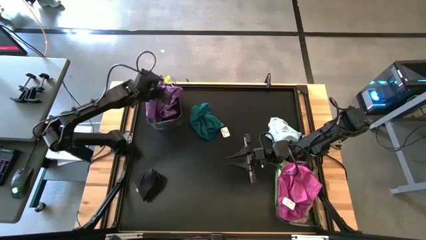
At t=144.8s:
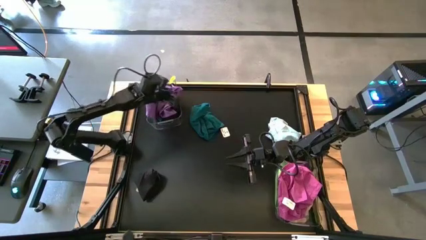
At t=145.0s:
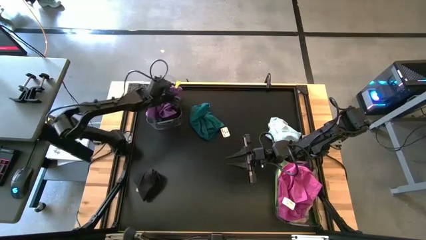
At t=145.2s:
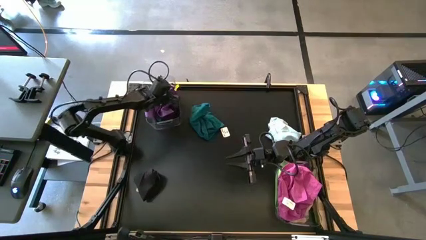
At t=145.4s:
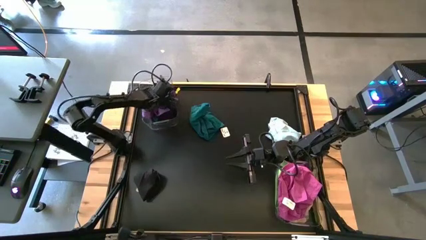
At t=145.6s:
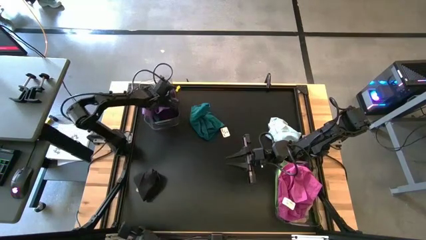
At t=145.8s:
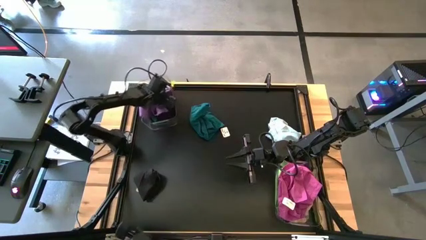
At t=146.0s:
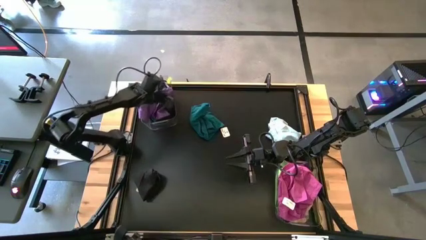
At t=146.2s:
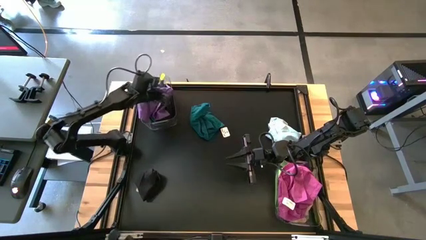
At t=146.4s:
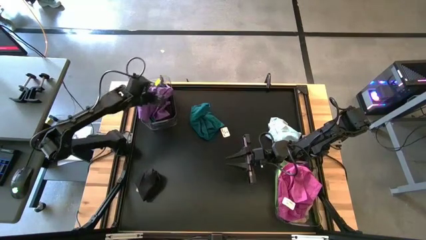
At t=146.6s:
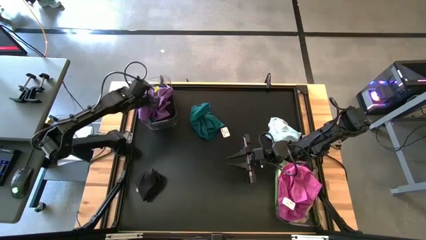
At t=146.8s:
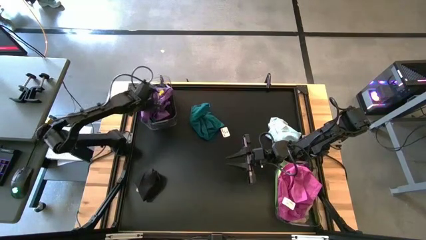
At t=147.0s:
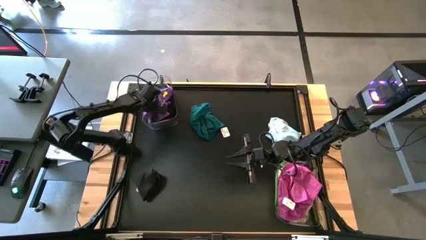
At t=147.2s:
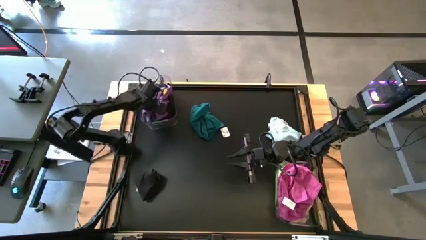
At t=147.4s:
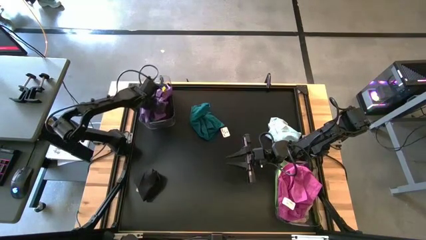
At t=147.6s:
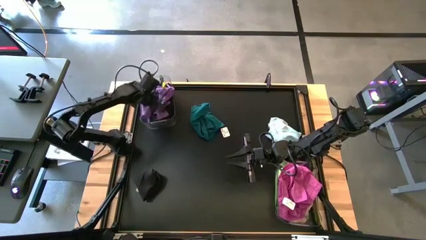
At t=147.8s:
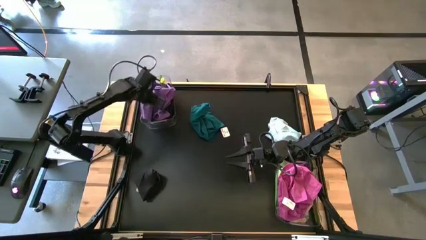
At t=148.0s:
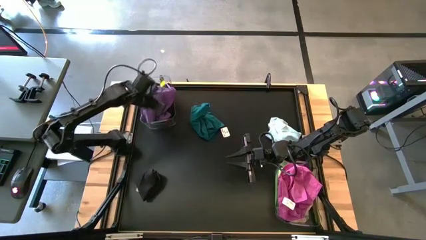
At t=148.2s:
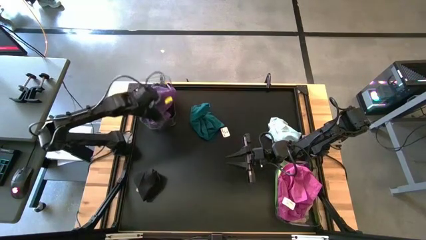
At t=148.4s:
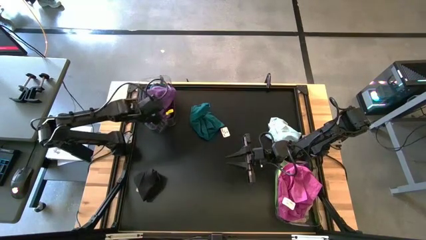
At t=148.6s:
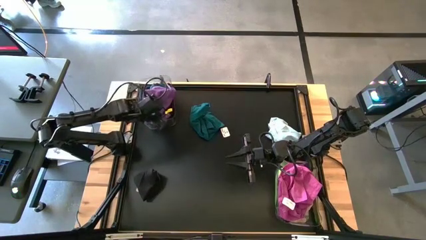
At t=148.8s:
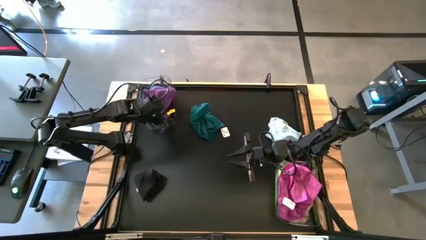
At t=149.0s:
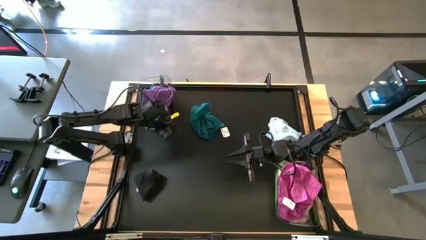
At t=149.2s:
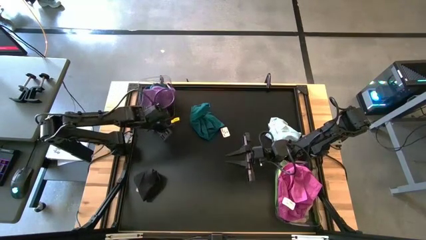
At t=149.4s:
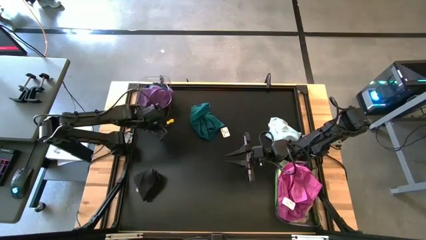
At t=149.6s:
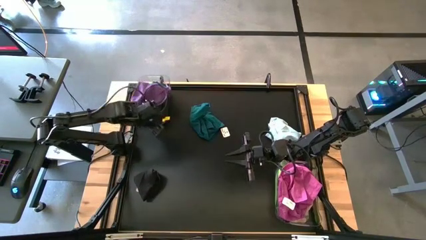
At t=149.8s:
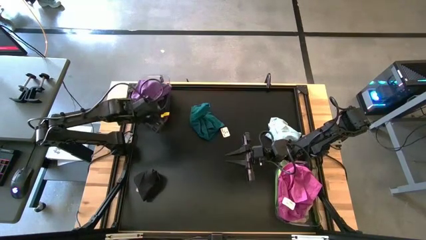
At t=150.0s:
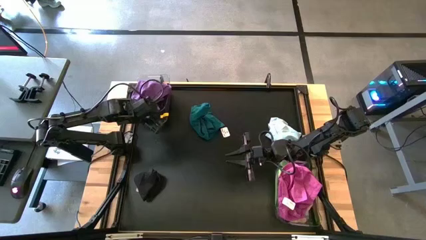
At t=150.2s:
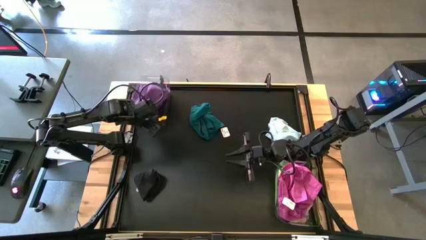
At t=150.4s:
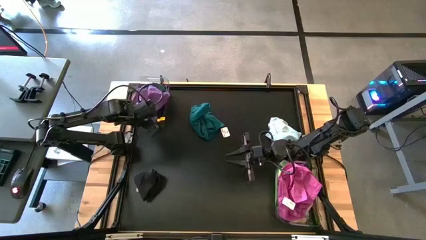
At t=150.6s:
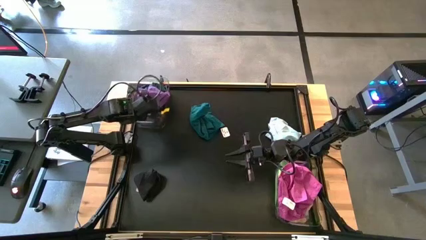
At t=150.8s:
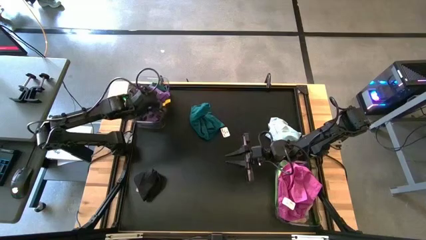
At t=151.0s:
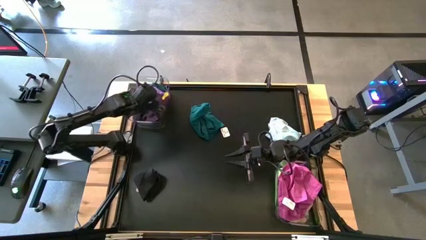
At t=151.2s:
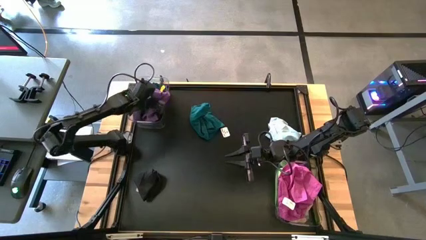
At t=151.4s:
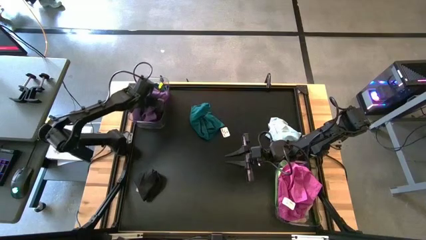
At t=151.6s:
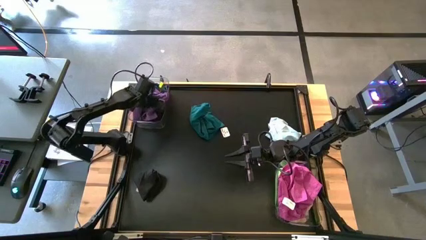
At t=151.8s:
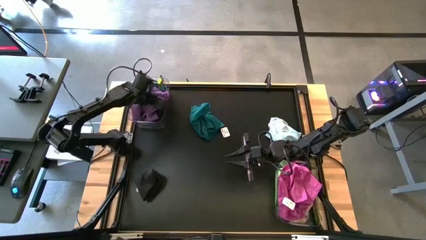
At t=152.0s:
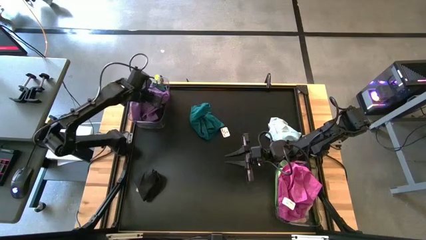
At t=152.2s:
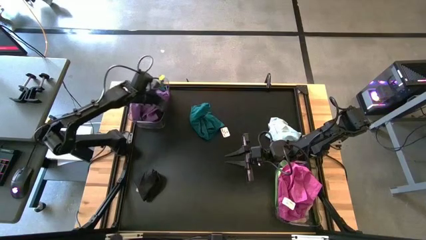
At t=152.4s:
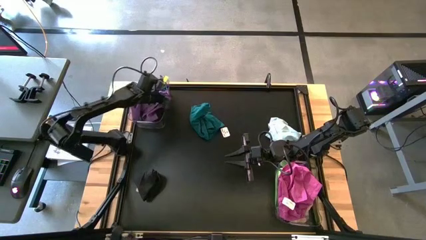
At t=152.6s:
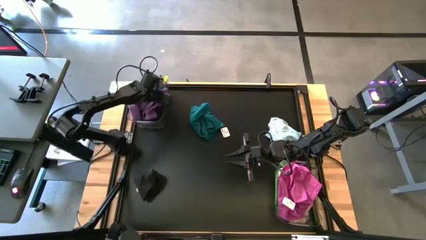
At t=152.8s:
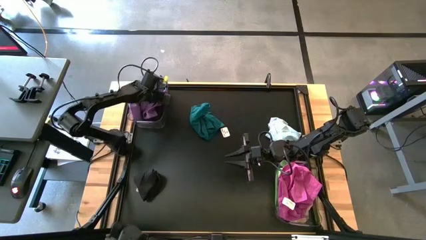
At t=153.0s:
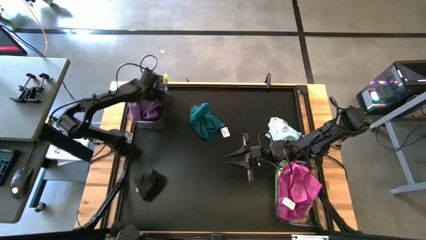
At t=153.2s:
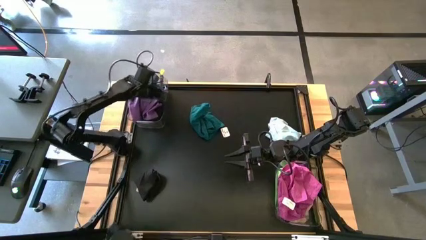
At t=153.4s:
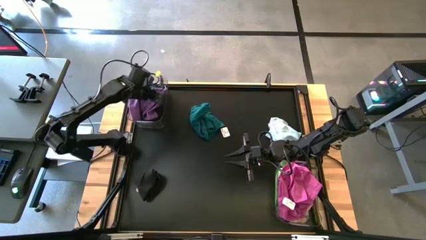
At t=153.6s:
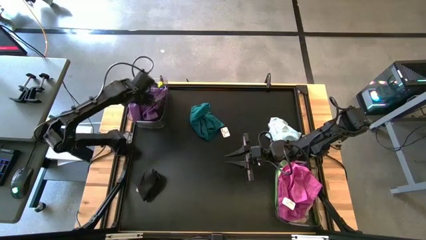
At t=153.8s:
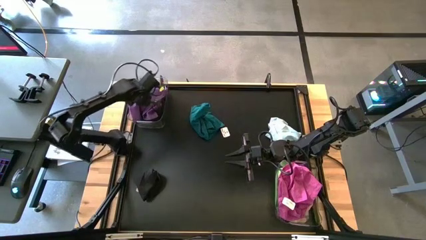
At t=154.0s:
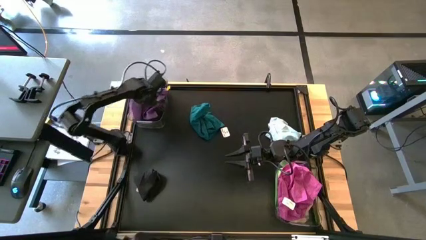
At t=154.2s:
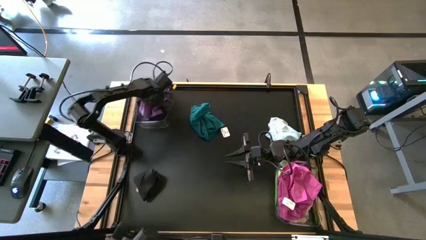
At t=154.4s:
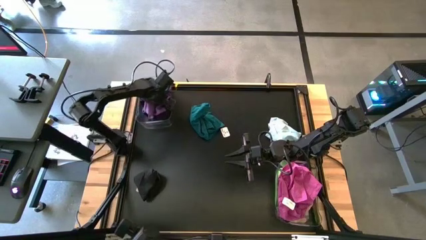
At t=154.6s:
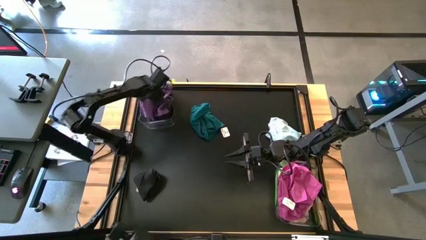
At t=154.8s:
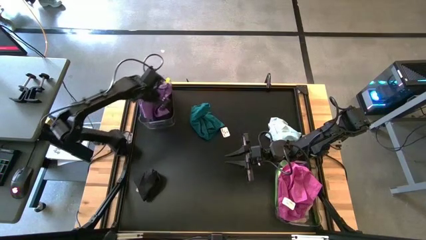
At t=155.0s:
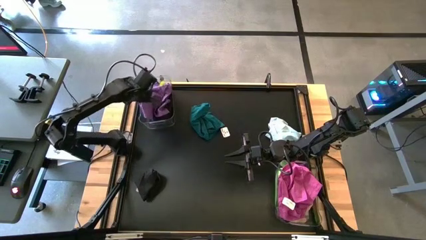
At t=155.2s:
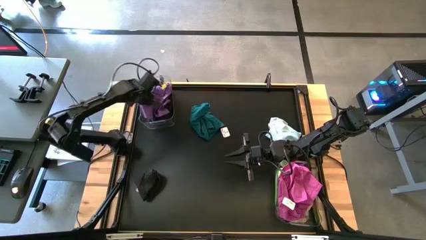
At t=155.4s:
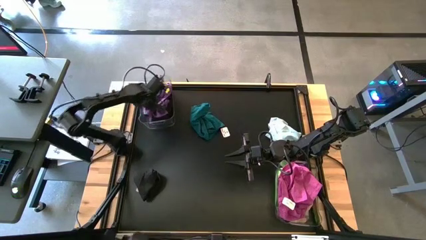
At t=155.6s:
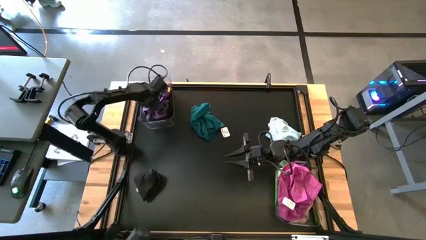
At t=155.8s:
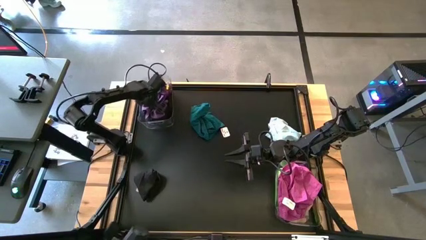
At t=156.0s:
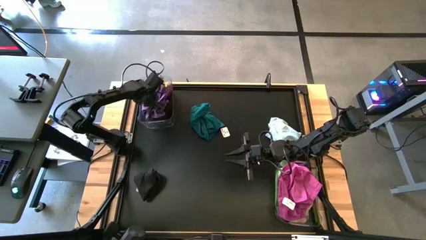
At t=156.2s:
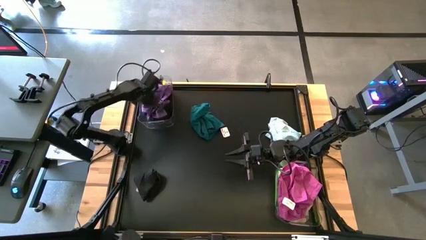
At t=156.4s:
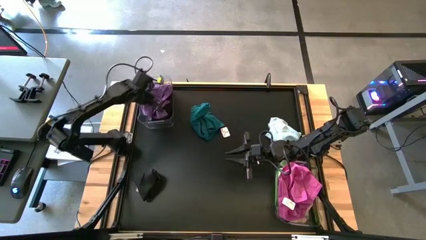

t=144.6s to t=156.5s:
Task: Sort towels by color in basket
Put the purple towel into the top transparent bin

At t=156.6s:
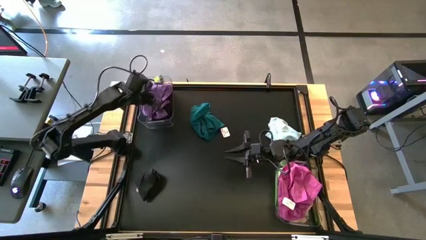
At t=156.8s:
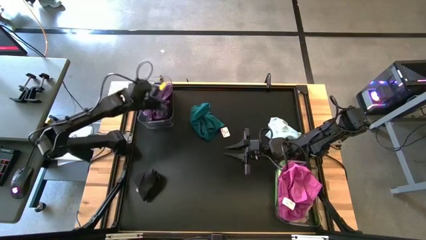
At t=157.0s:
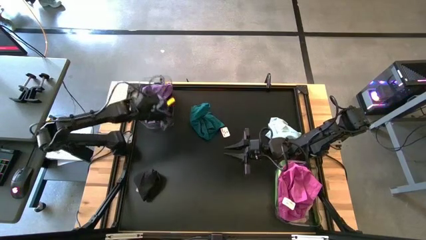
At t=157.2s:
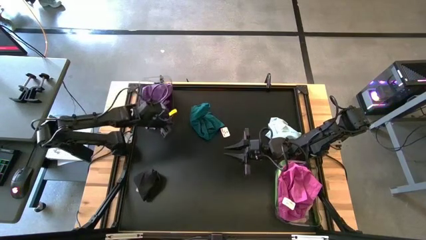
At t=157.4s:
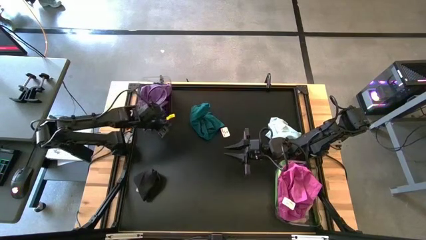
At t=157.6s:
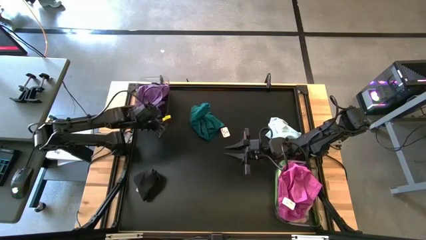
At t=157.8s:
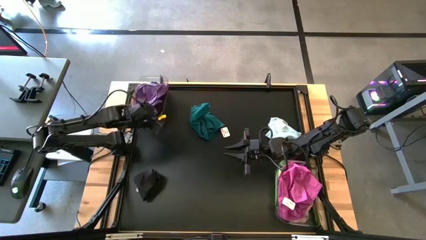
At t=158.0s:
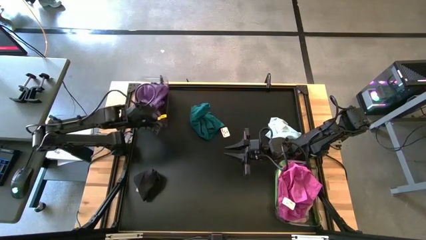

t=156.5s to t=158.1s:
Adjust the top transparent bin

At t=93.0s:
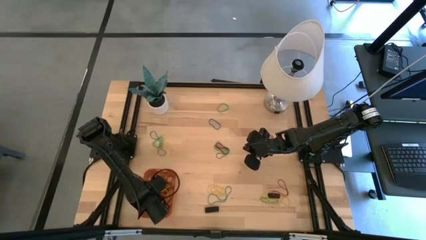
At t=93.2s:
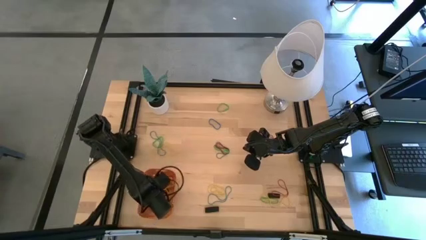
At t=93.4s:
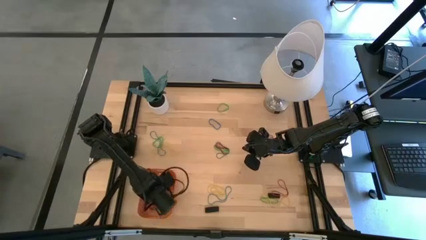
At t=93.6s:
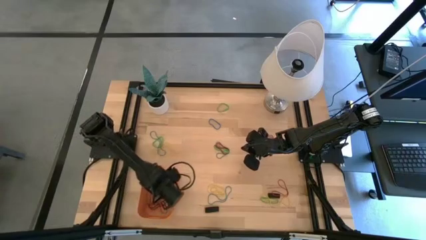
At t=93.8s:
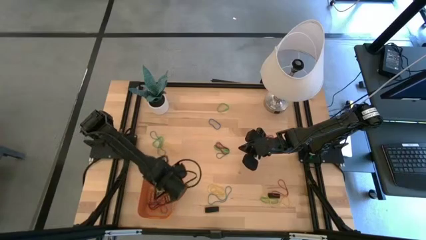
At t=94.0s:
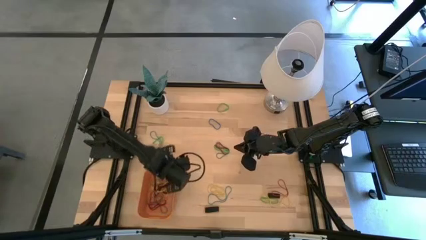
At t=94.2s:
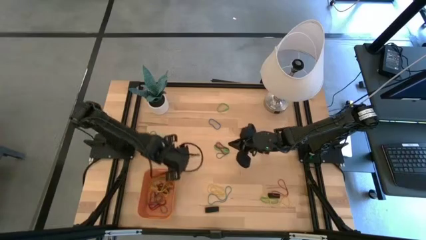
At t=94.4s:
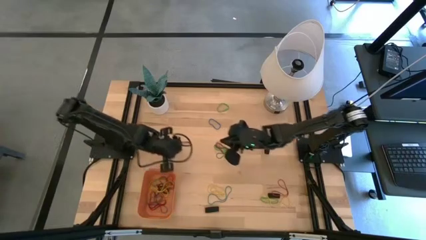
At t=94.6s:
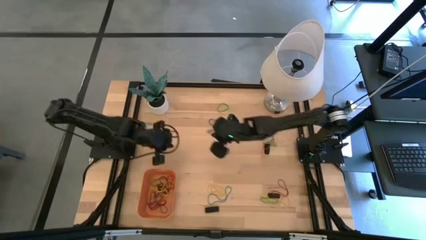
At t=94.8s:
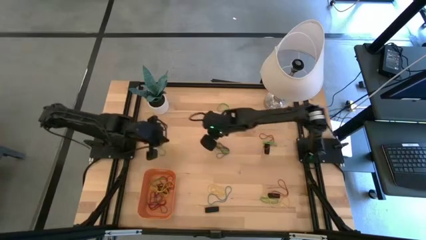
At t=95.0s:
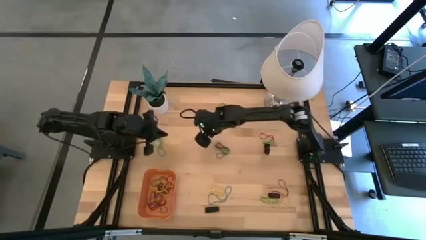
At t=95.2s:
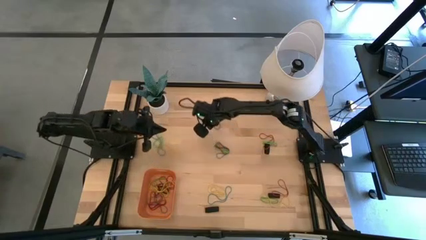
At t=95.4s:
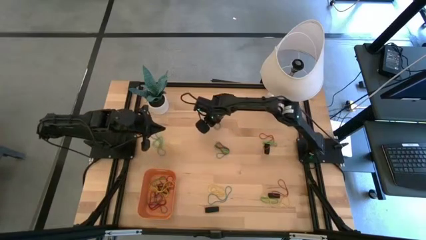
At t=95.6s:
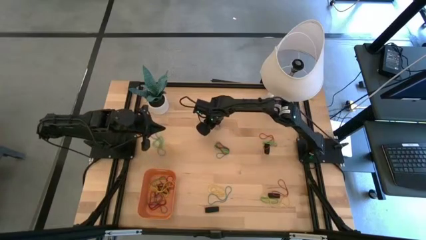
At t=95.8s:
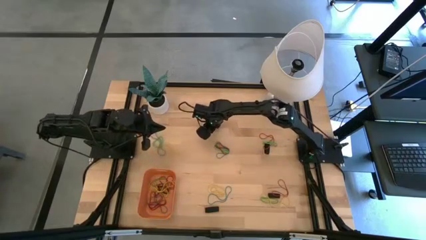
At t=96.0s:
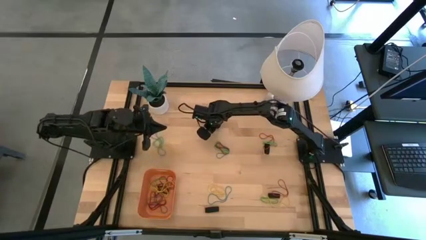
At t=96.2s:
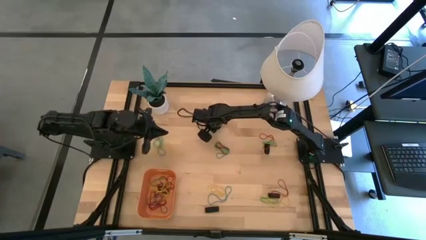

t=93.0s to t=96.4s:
Task: Pick and place rubber bands into bin
Put the blue rubber band into the orange bin
